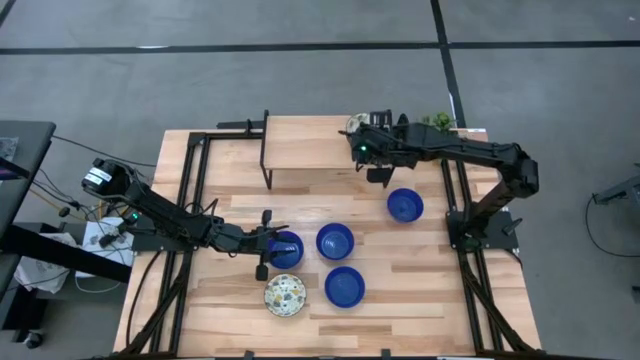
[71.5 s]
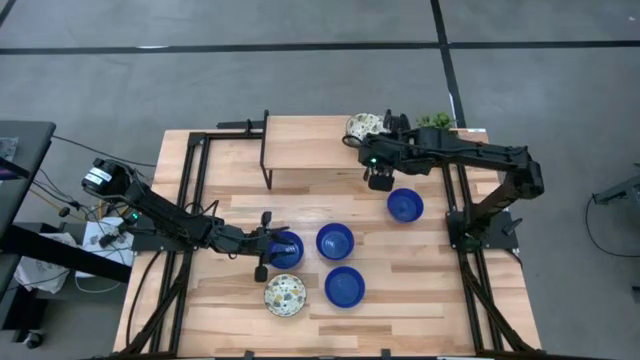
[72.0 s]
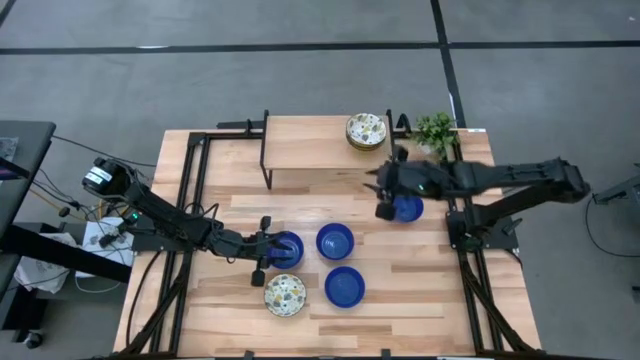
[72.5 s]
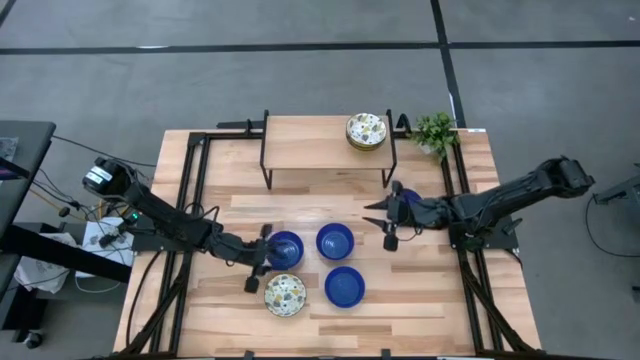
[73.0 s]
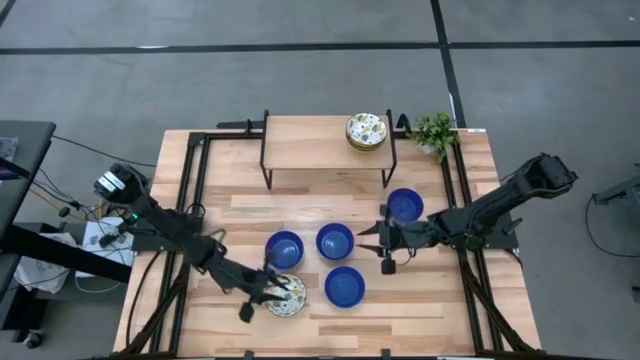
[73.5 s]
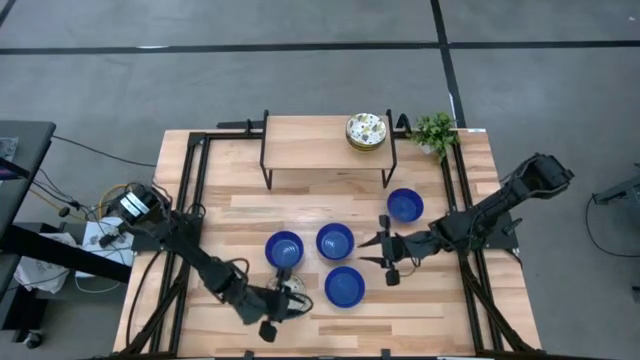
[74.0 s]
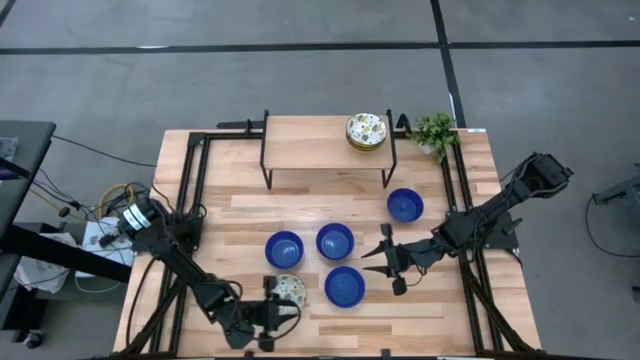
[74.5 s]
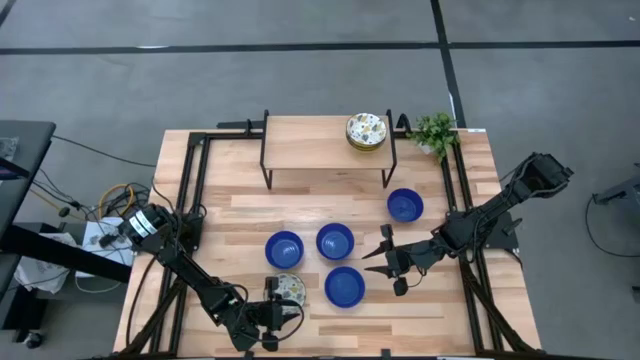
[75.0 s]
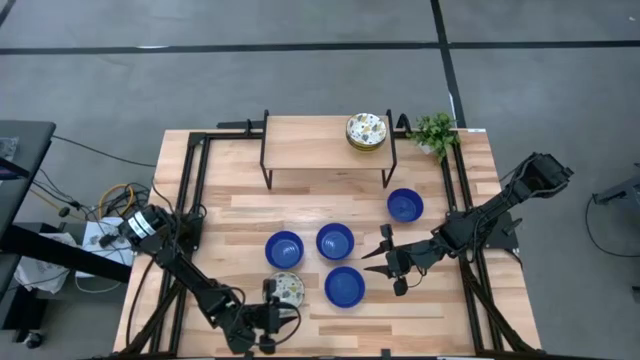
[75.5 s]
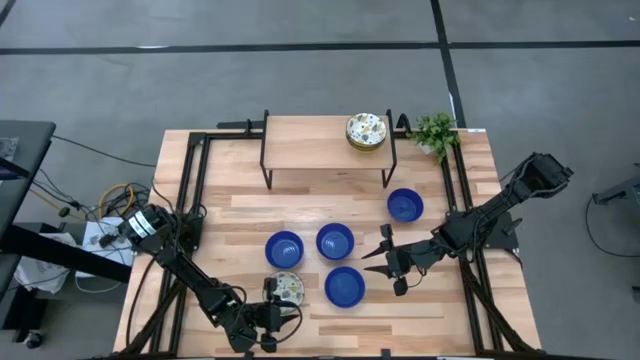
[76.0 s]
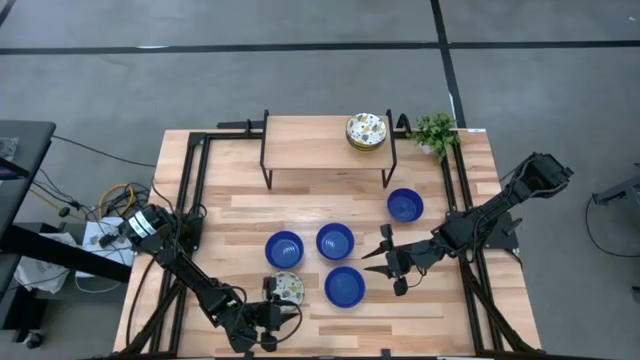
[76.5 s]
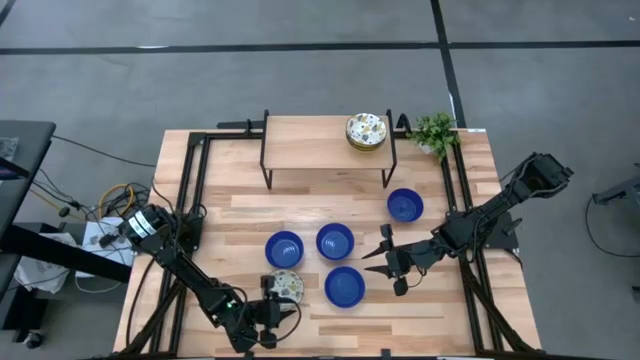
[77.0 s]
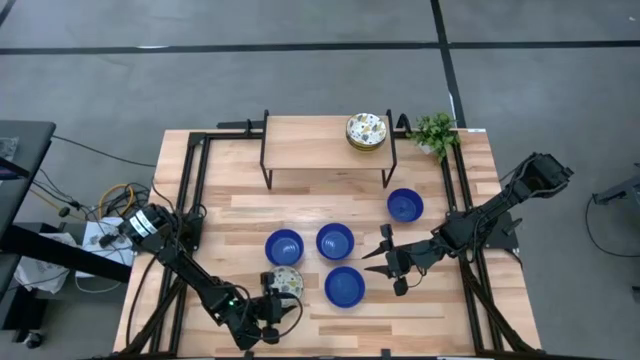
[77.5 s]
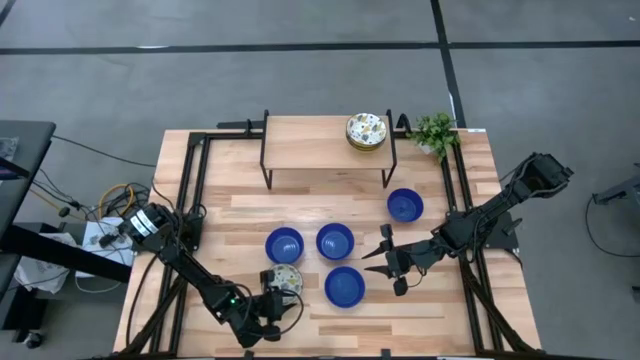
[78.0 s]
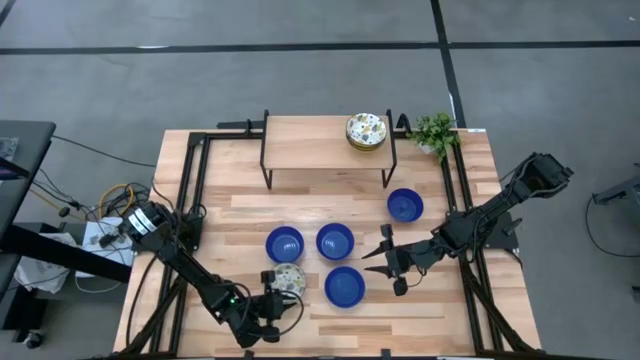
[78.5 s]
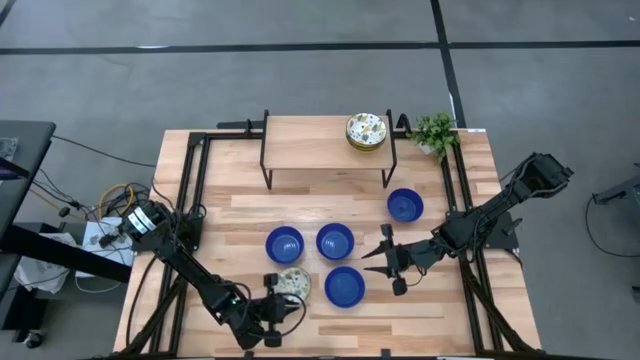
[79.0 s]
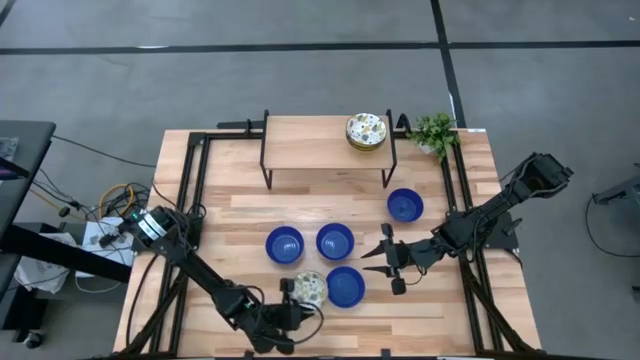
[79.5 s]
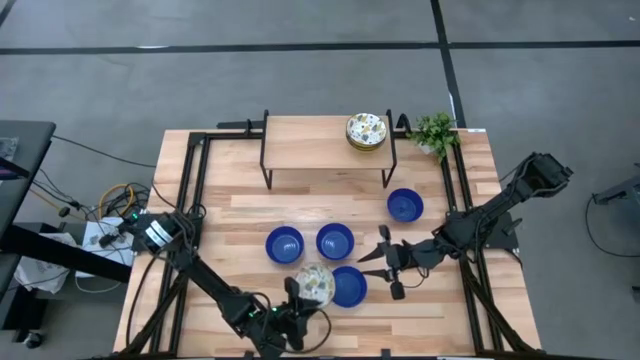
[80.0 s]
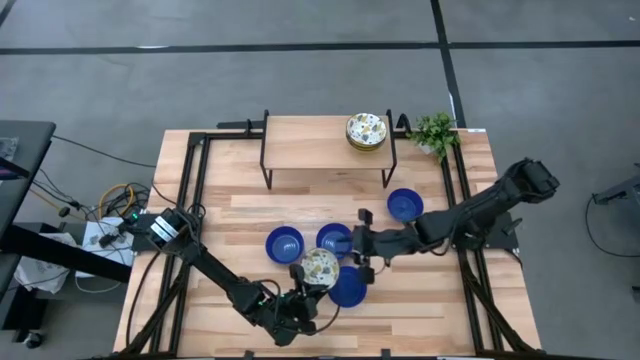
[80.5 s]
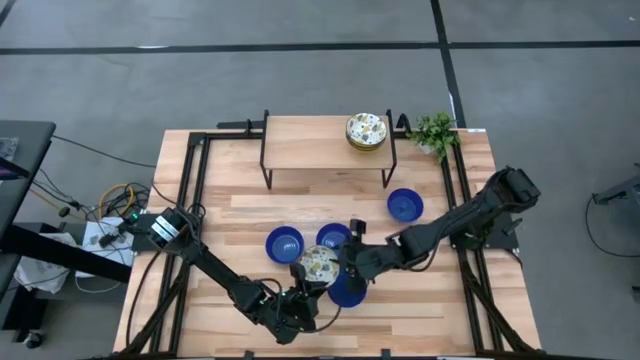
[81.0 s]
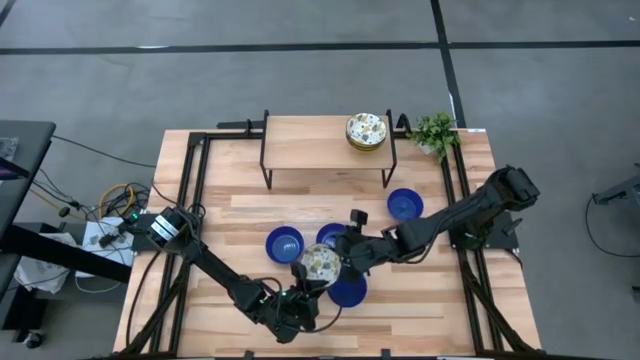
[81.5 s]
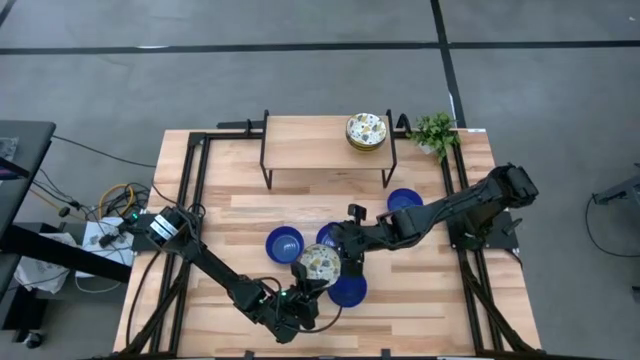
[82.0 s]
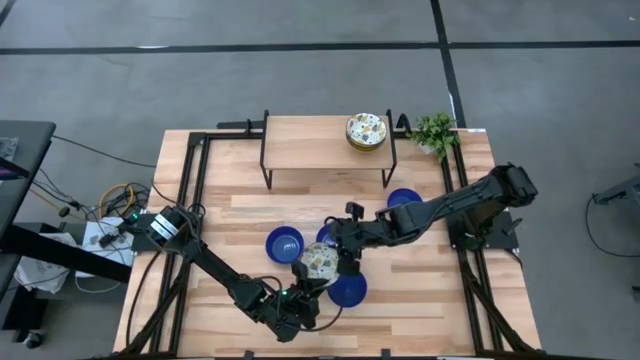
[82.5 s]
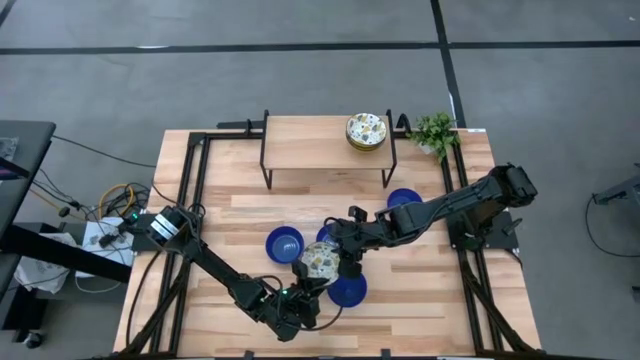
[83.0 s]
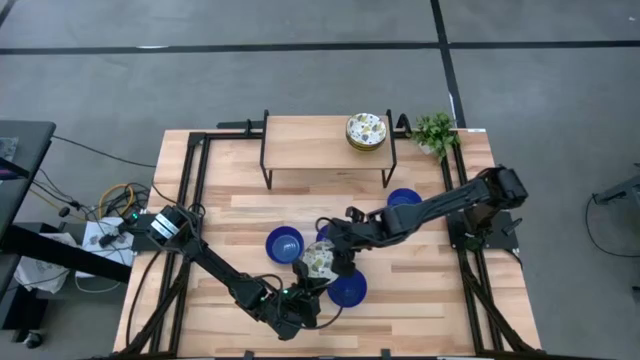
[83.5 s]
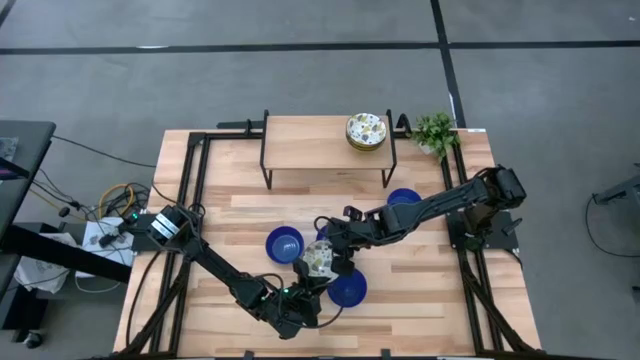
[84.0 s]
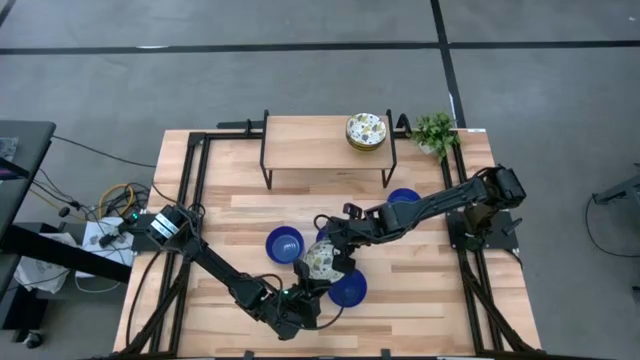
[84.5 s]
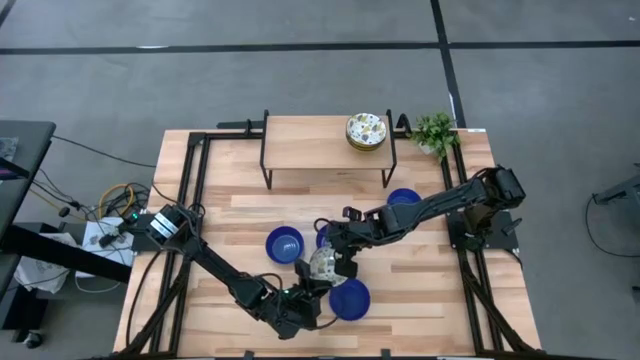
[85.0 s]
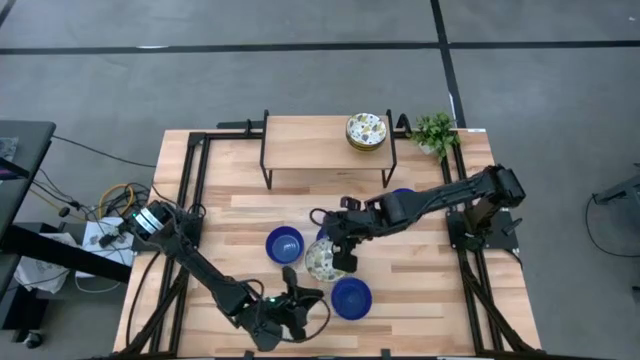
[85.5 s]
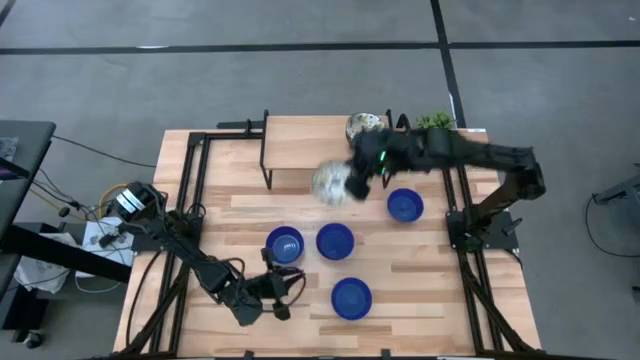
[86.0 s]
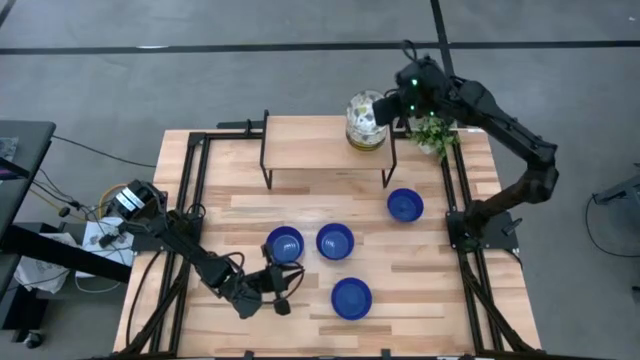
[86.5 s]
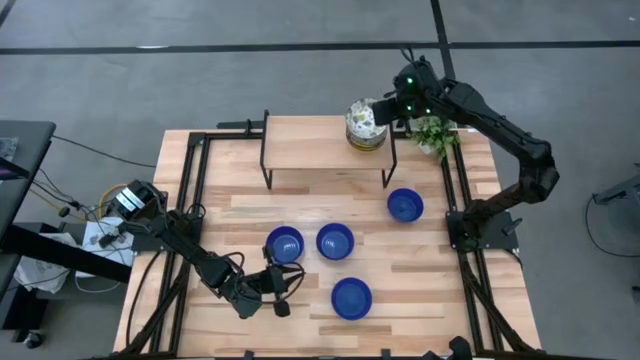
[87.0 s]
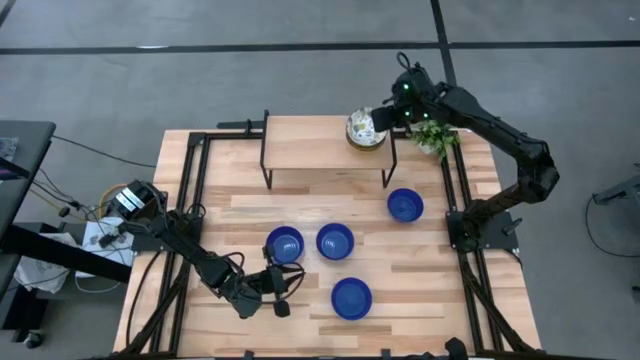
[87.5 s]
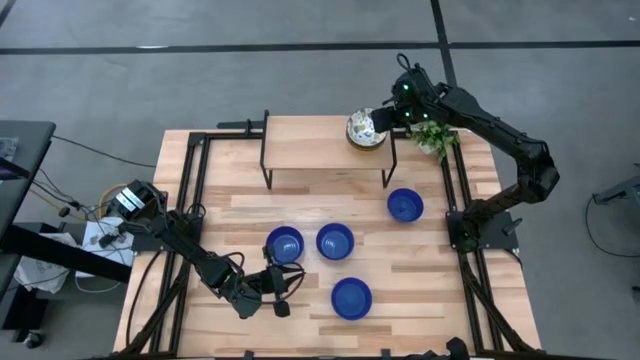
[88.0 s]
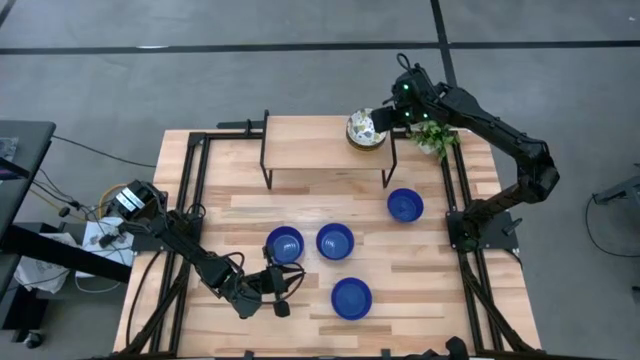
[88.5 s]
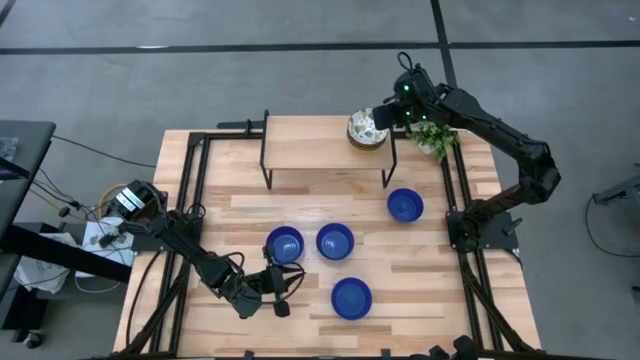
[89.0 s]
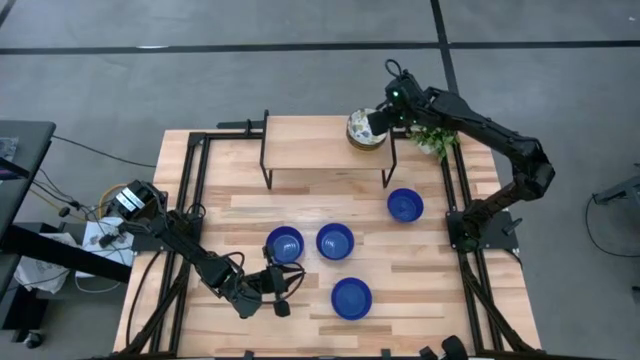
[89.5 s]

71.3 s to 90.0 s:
Task: Pick & Place Mini bowls
Stack the yellow patterned bowl on top of the yellow patterned bowl on the shelf

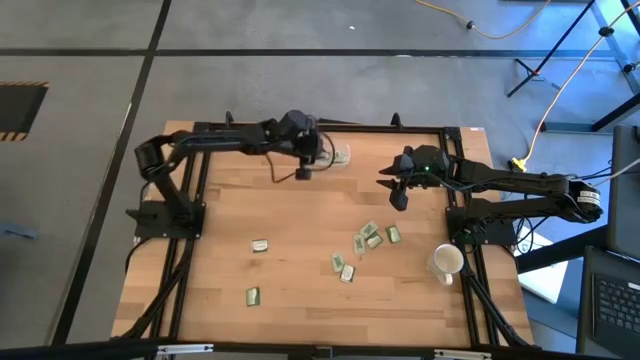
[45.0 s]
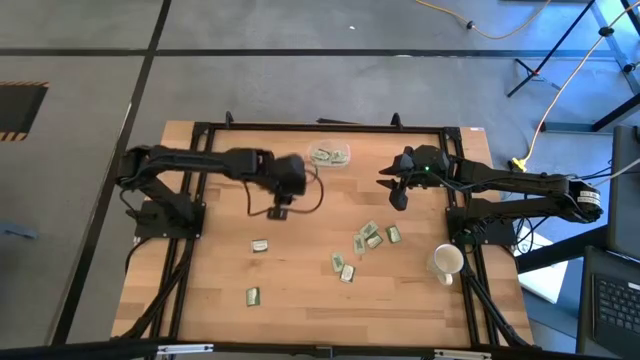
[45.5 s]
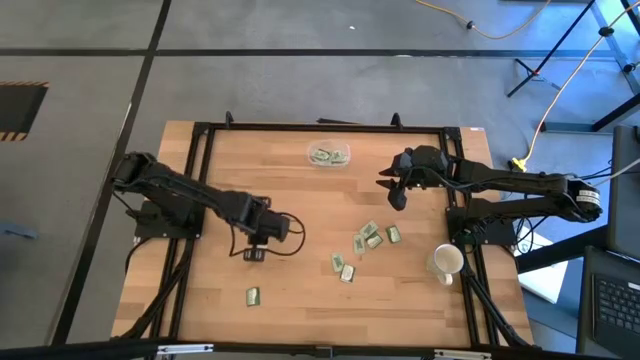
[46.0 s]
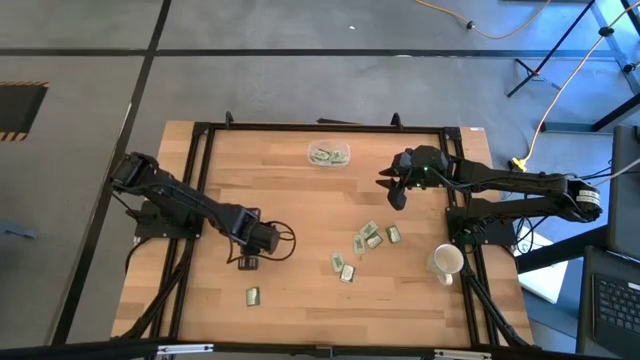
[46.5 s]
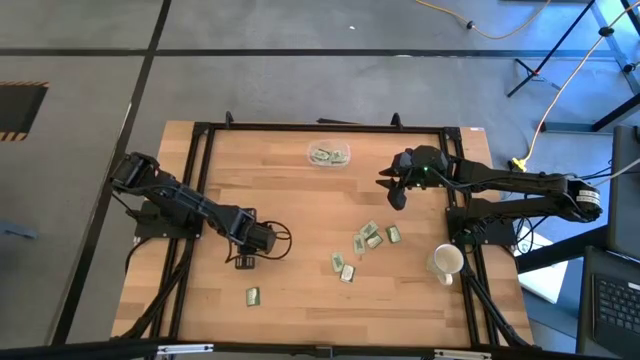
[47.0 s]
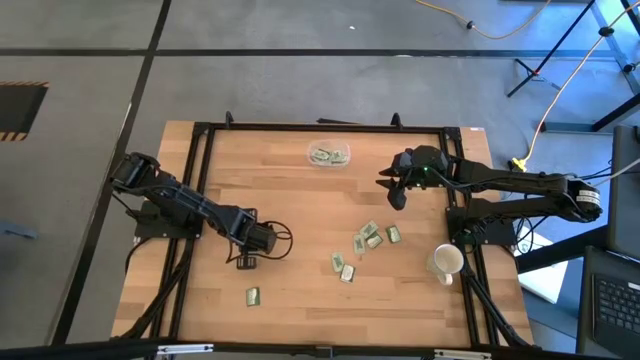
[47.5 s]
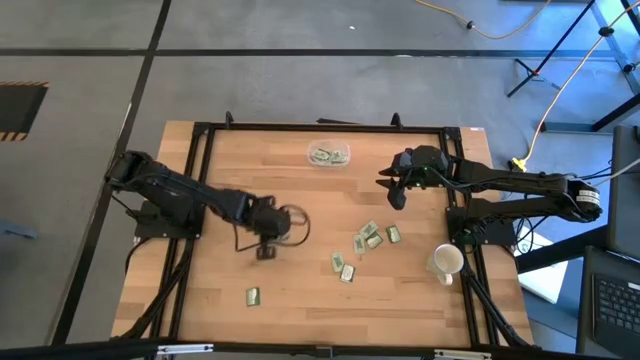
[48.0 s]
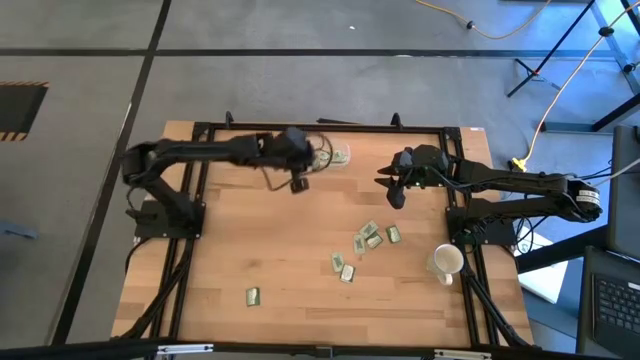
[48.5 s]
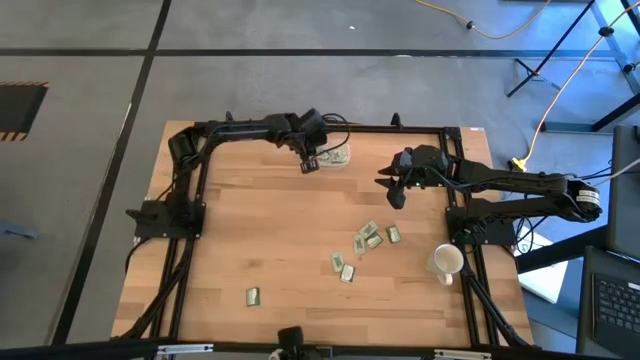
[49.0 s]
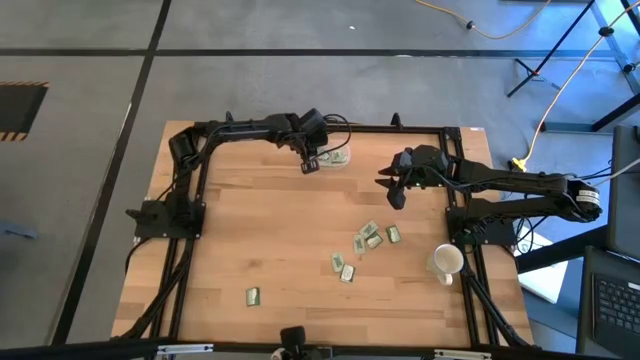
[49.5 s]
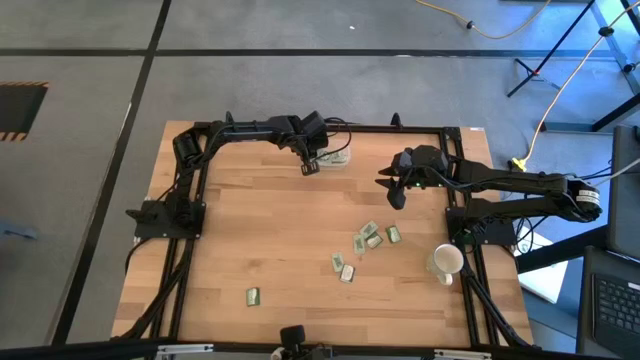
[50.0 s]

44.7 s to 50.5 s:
Task: Pick and place items into bin
Put the green stevia packet into the transparent bin
